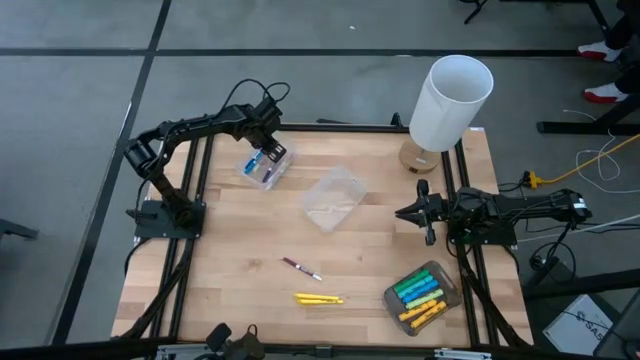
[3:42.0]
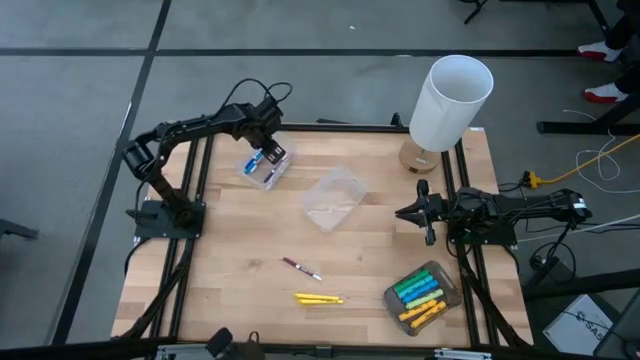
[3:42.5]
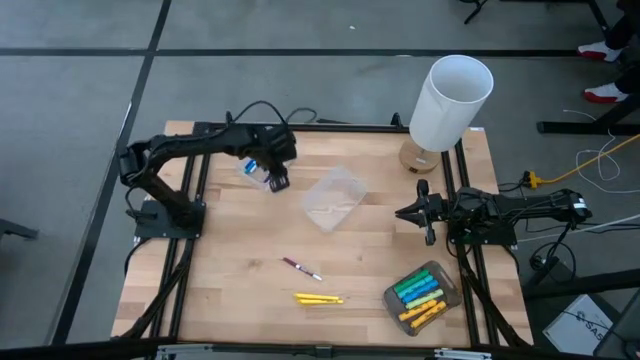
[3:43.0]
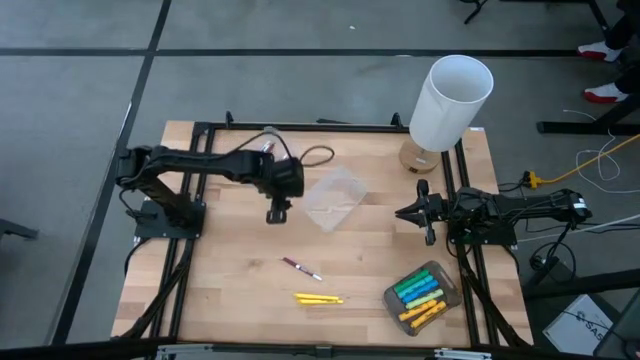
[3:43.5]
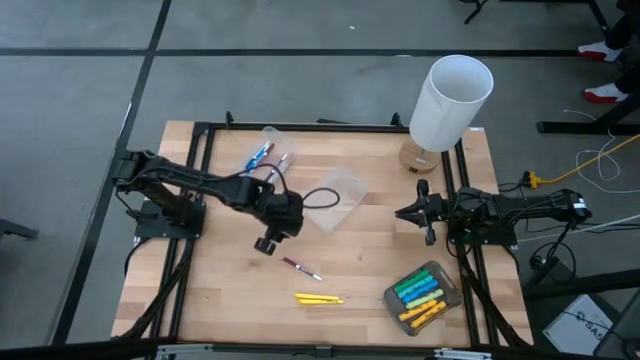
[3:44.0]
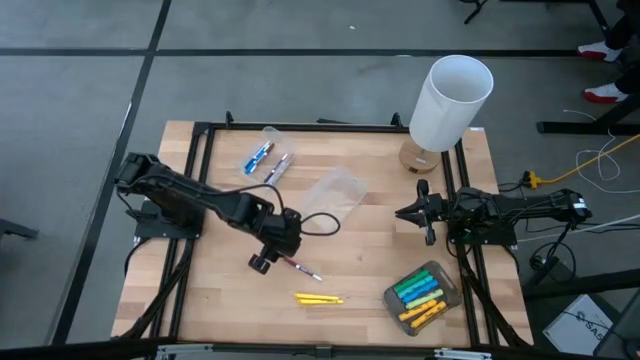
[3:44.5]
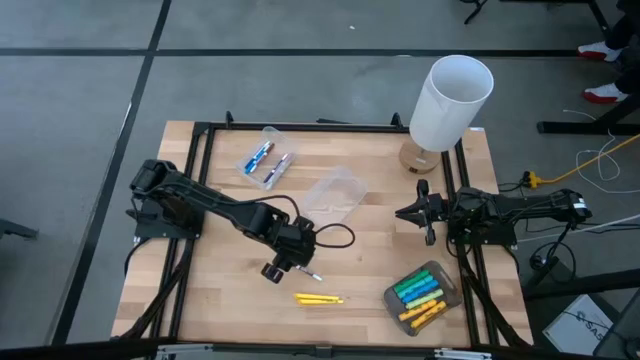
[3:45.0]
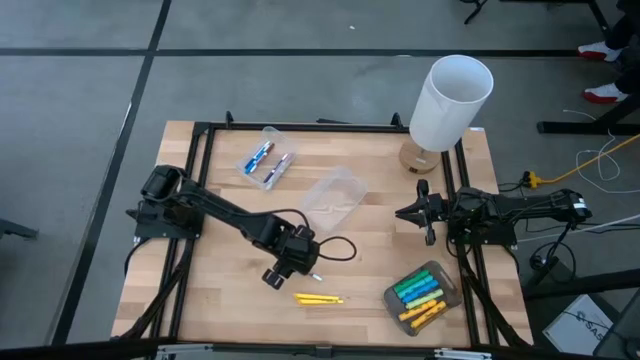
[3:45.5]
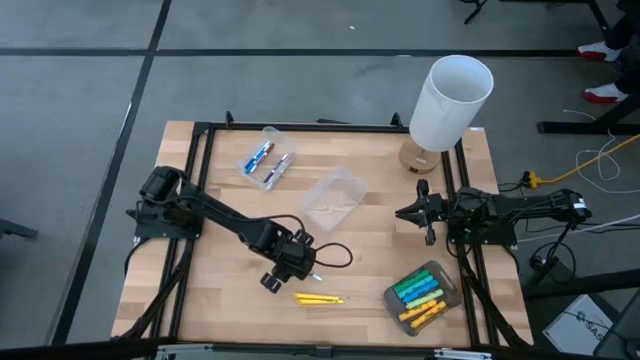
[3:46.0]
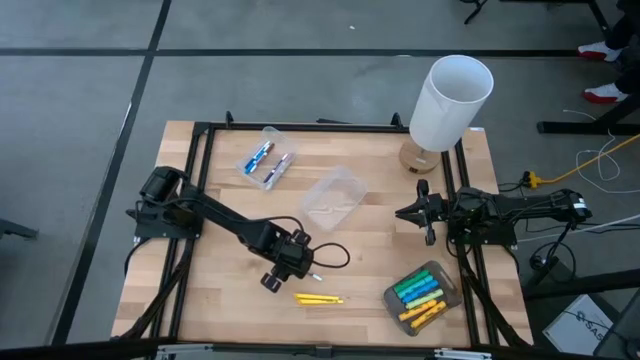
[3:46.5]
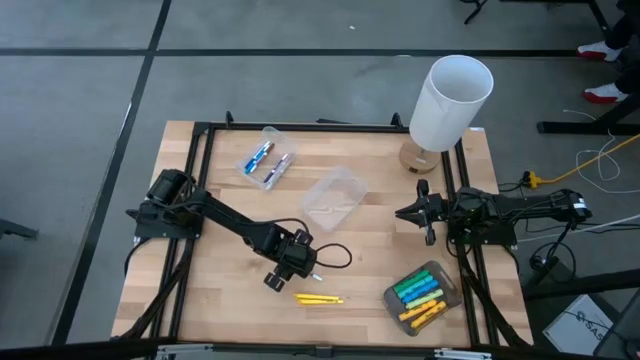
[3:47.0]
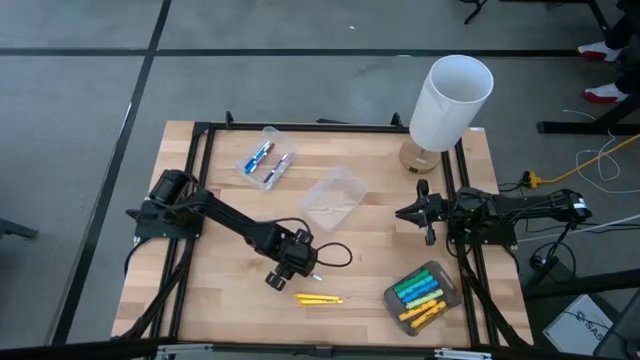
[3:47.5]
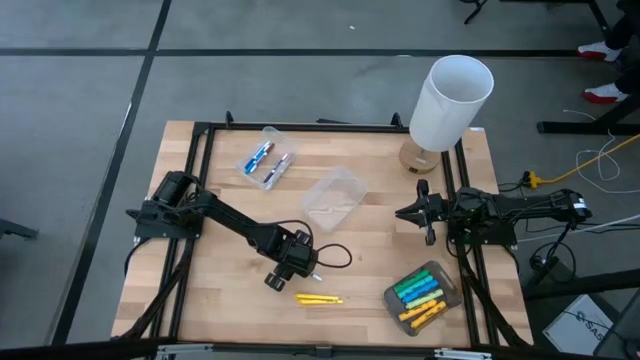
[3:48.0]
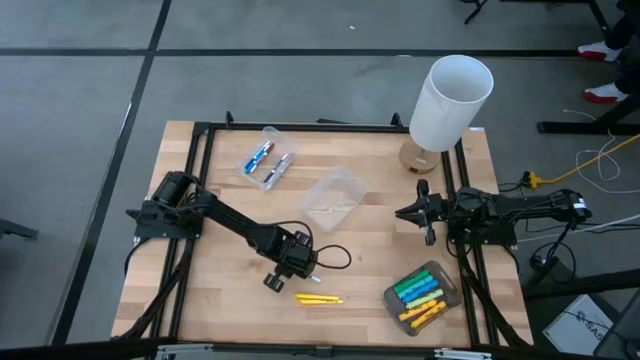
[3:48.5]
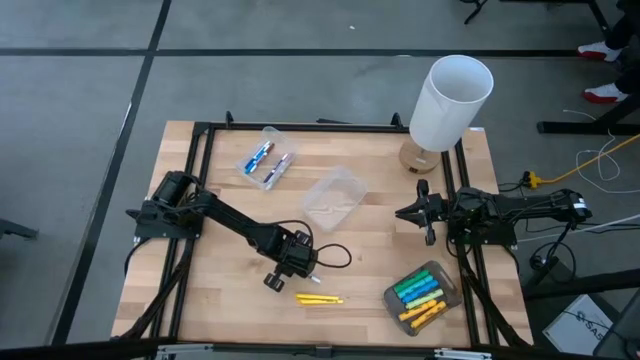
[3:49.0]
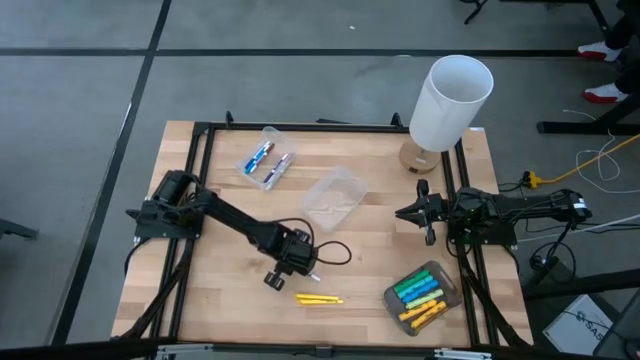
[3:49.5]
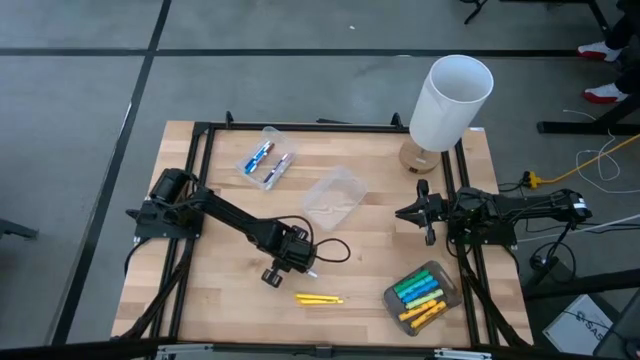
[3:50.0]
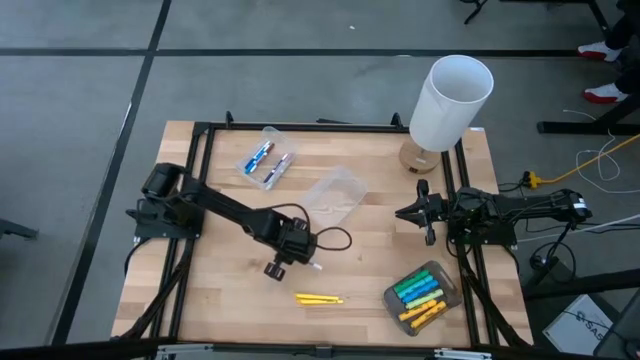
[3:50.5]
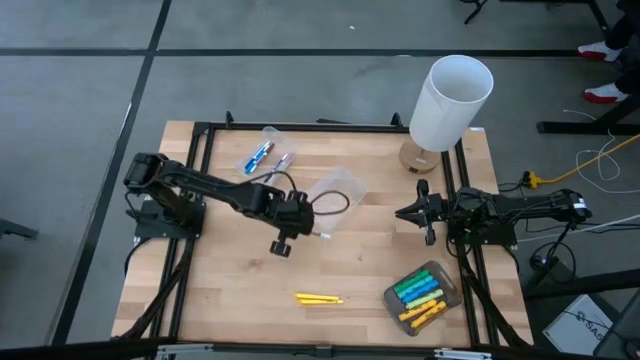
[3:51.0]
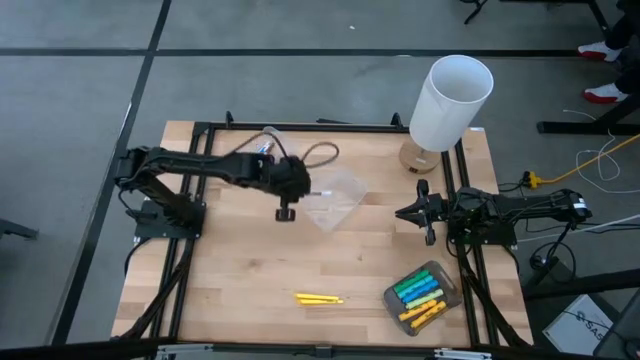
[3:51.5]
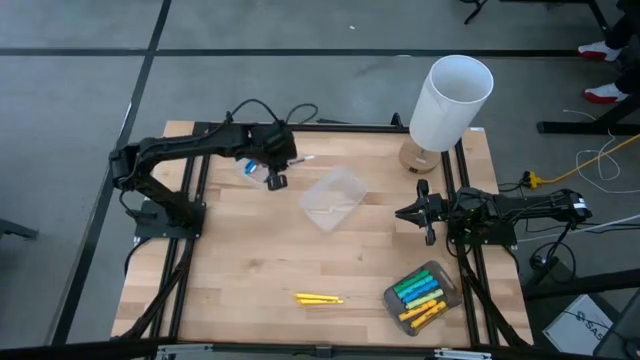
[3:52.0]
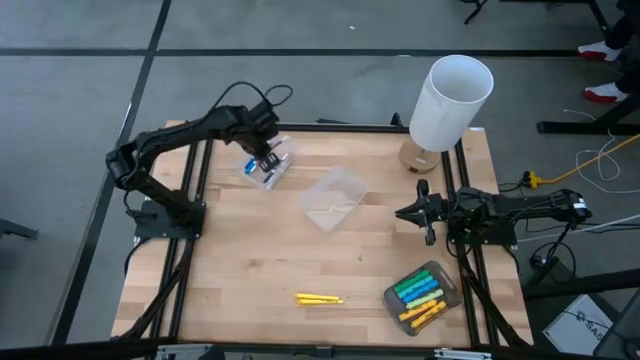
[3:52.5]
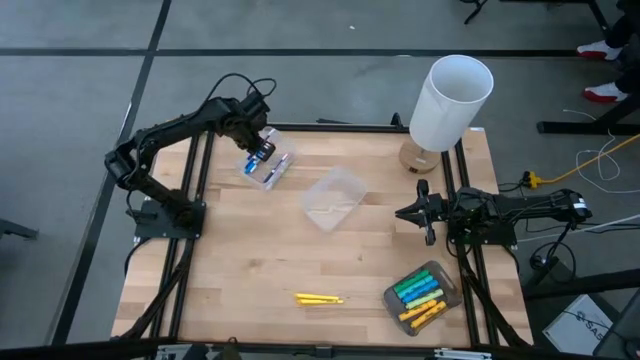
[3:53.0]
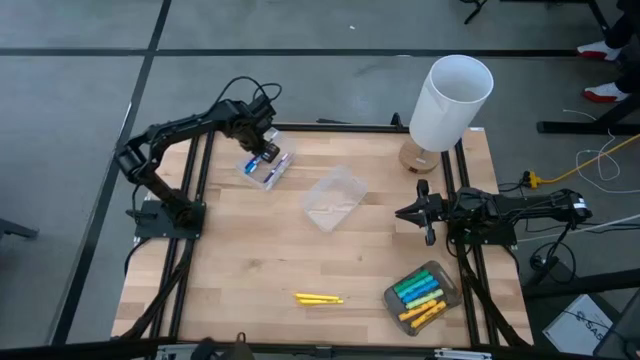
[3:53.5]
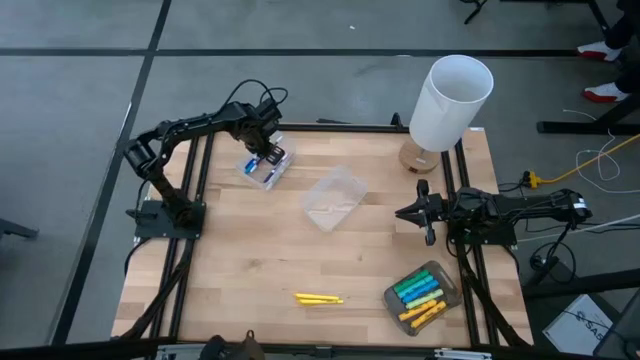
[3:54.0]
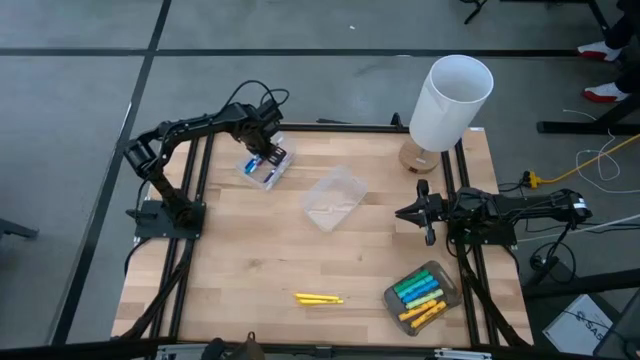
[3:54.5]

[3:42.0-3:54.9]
Task: Pick & Place Markers
Put the violet marker into the transparent bin

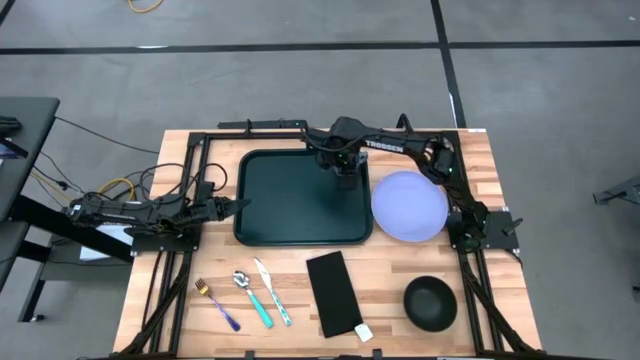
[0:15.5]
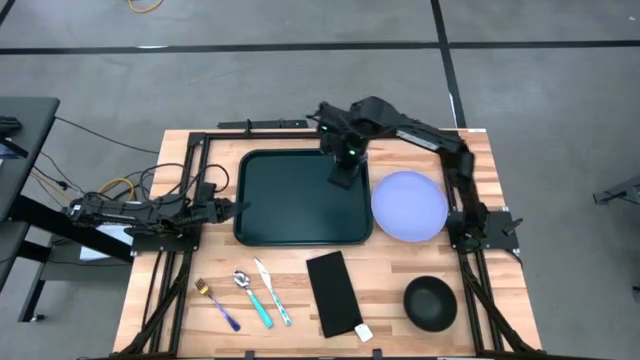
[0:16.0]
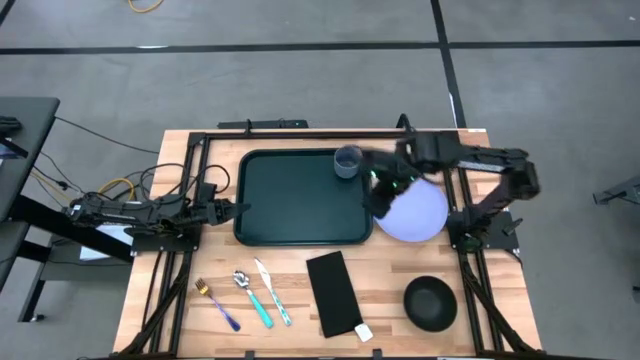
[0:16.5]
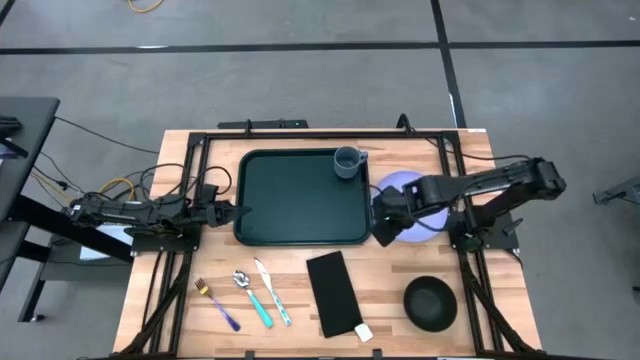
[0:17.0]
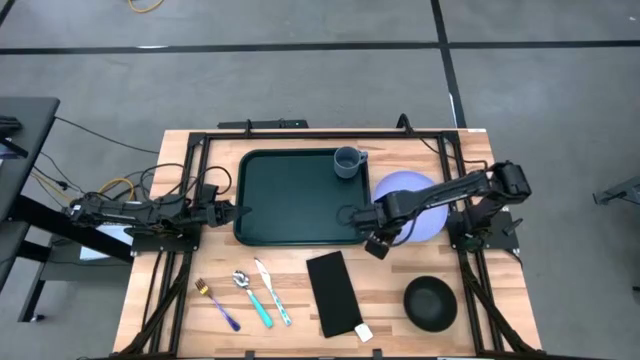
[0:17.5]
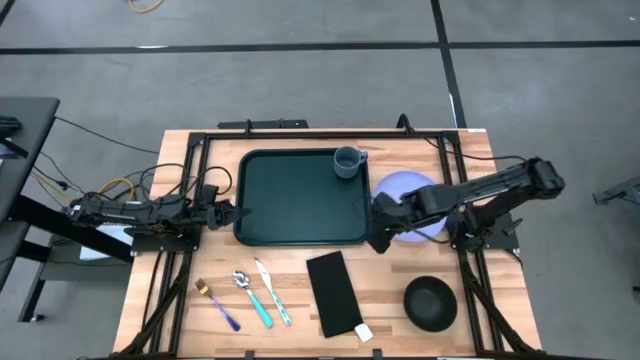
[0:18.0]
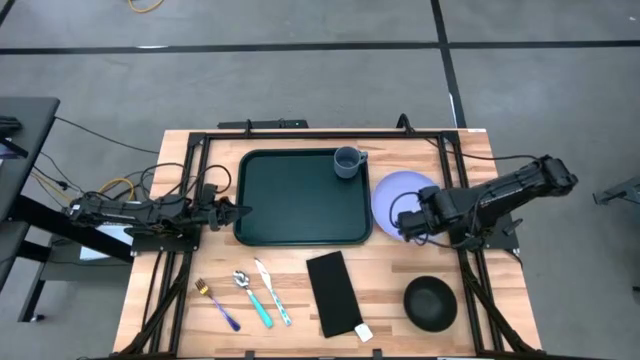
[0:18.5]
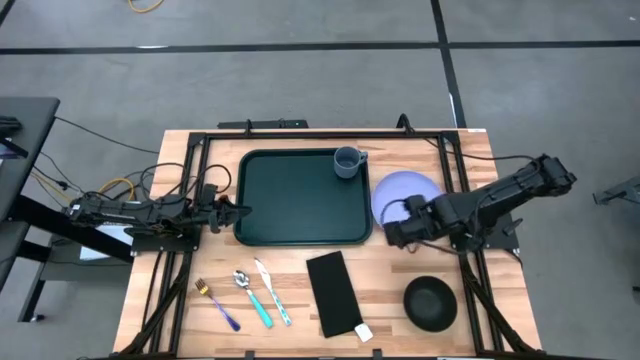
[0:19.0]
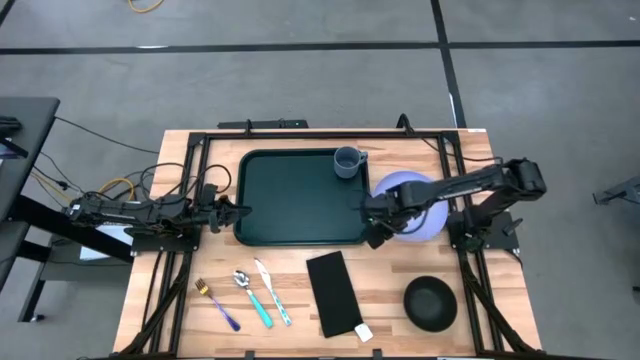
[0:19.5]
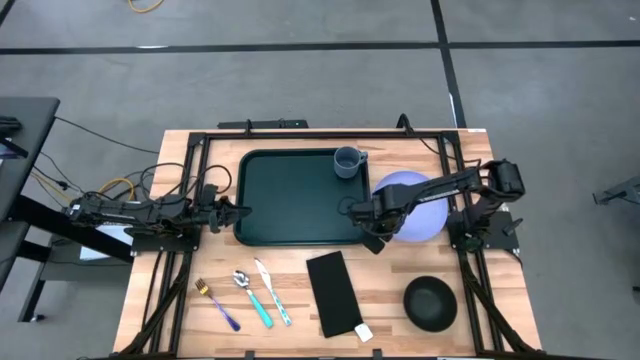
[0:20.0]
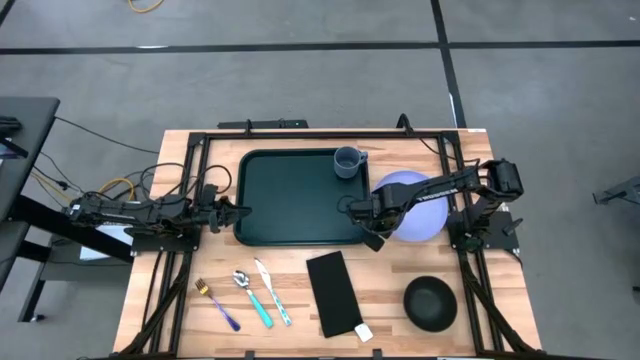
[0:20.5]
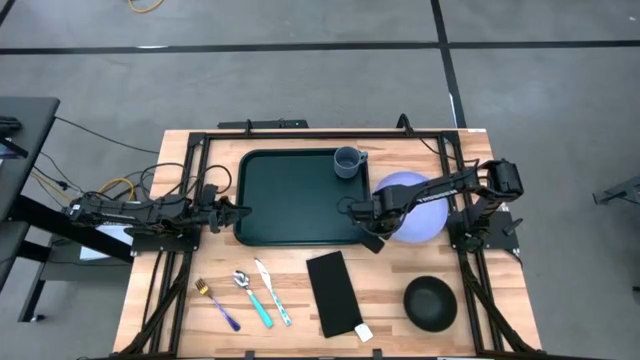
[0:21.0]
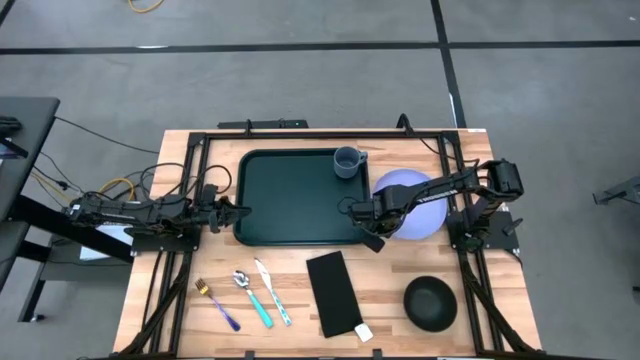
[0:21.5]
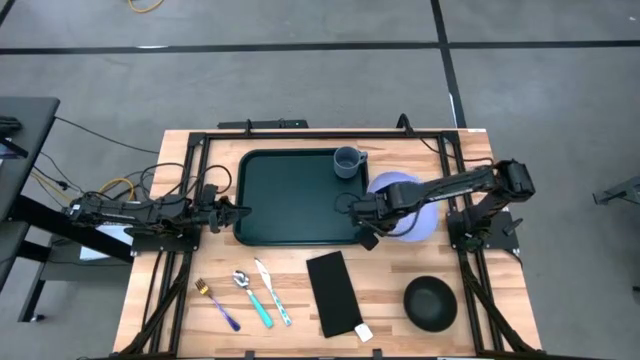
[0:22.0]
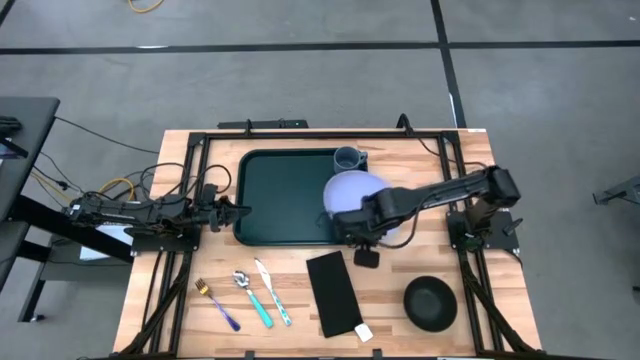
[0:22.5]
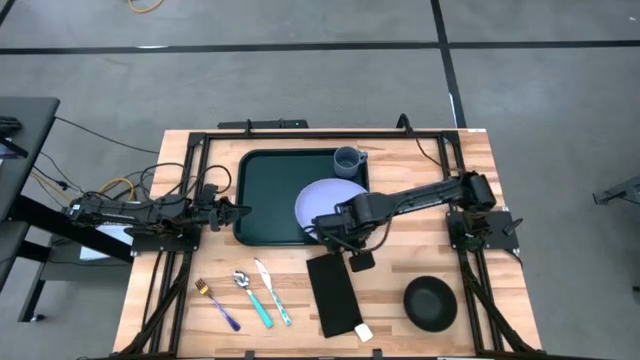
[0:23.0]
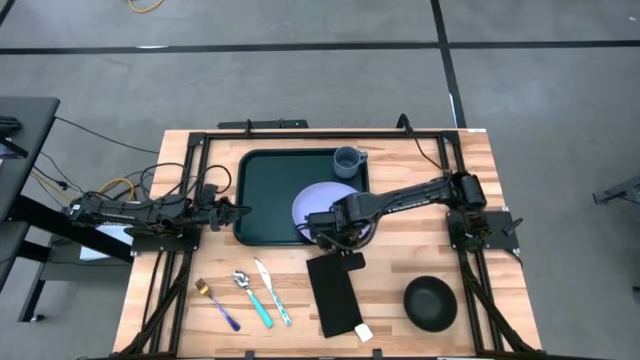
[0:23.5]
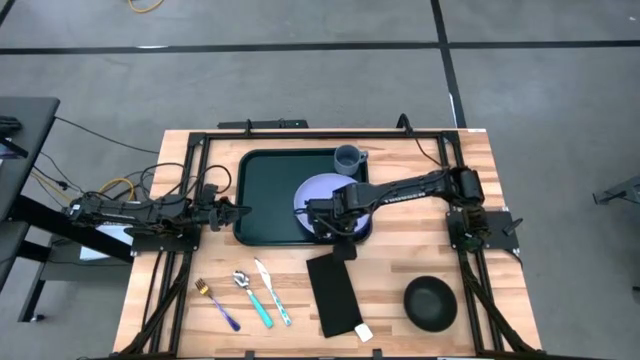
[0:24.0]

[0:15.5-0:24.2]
Task: Set up tray
Put the violet plate on the black tray to the bottom of the gray mug
